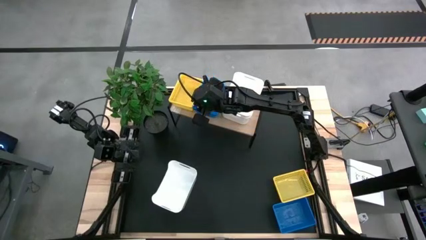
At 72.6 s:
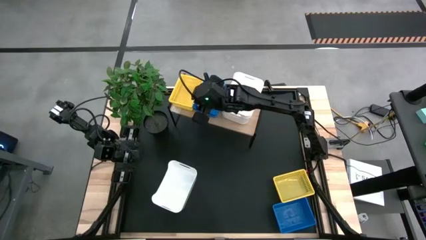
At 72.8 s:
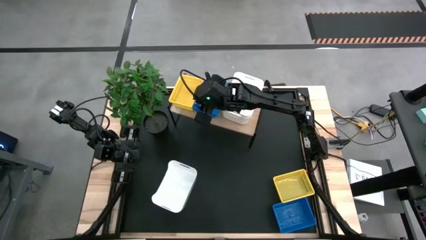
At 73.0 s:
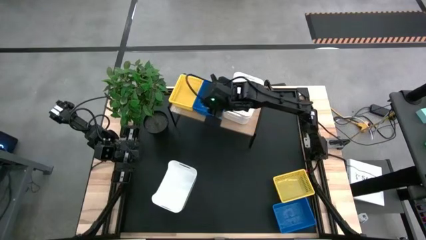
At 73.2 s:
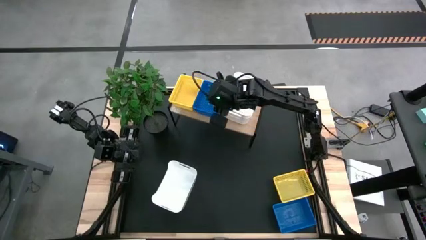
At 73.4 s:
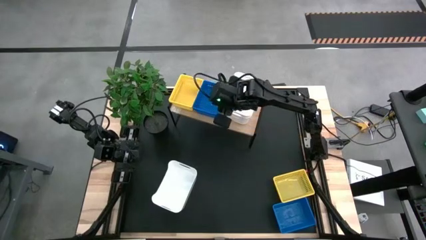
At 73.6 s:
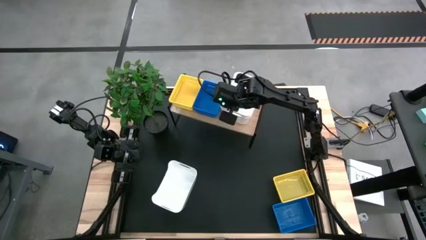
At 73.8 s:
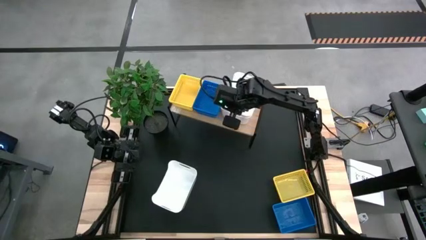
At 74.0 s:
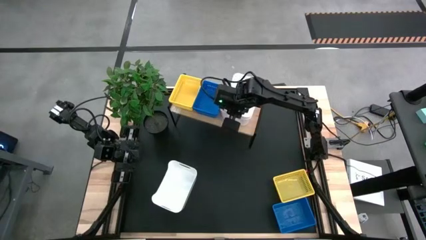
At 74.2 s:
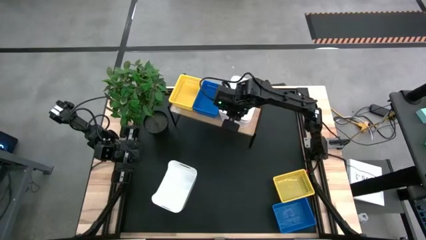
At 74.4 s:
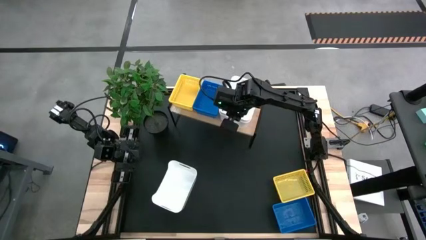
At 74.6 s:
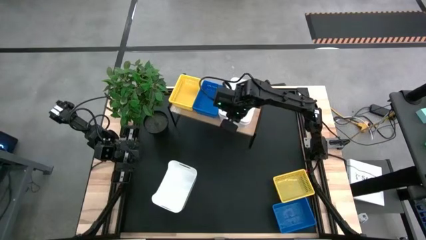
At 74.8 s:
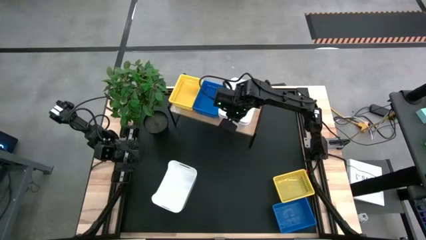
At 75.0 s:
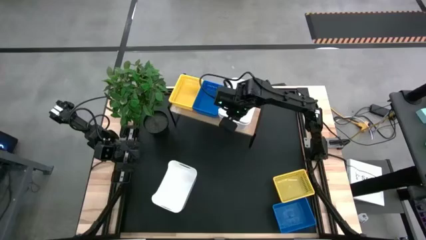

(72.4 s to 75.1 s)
Task: Stack baskets on shelf by color
Adjust the stacked white bins on the shelf

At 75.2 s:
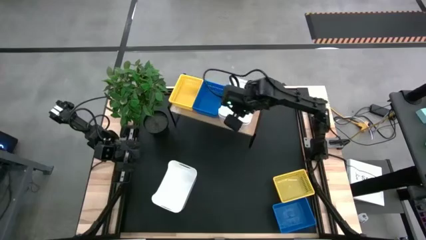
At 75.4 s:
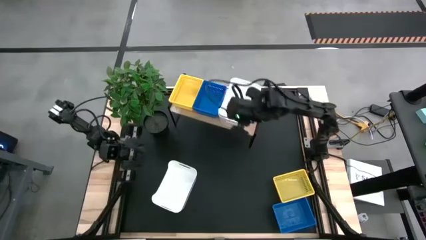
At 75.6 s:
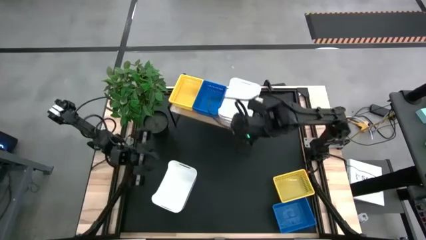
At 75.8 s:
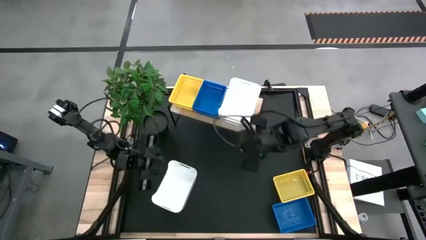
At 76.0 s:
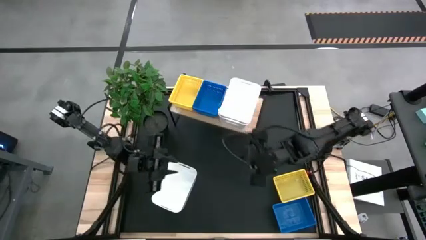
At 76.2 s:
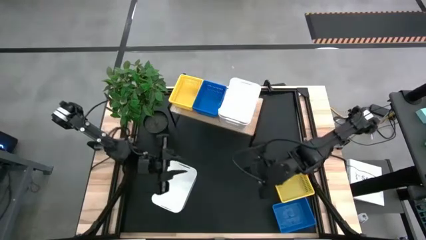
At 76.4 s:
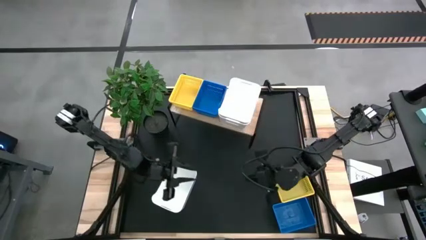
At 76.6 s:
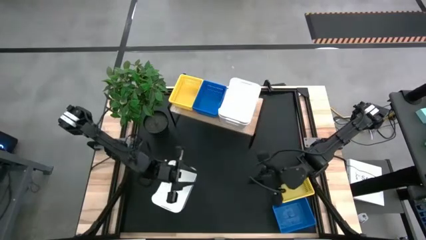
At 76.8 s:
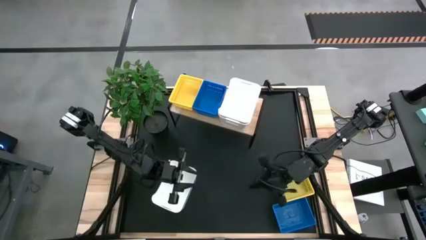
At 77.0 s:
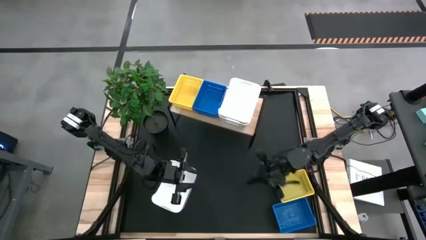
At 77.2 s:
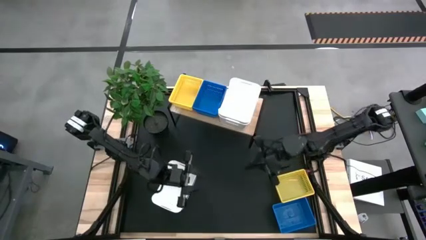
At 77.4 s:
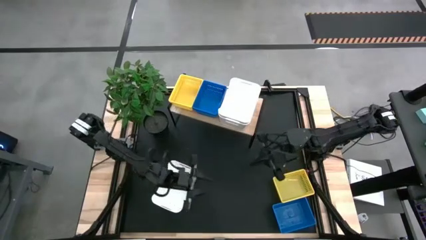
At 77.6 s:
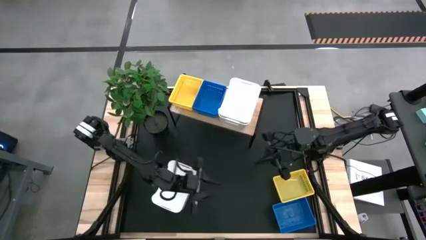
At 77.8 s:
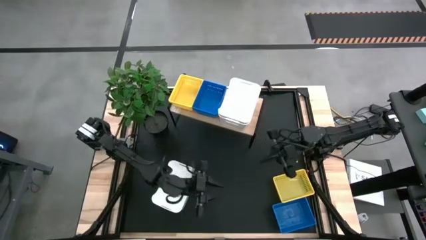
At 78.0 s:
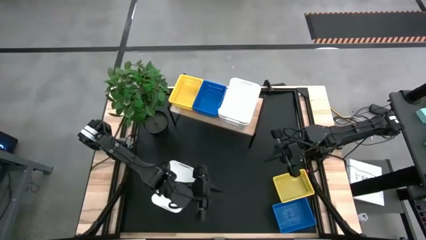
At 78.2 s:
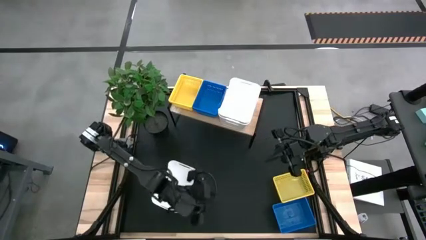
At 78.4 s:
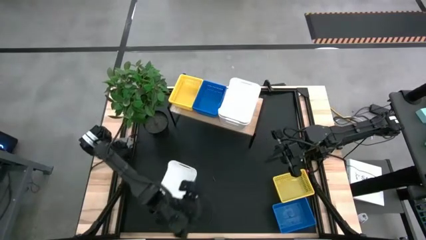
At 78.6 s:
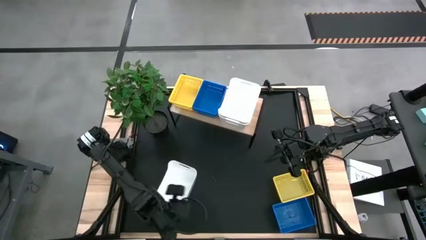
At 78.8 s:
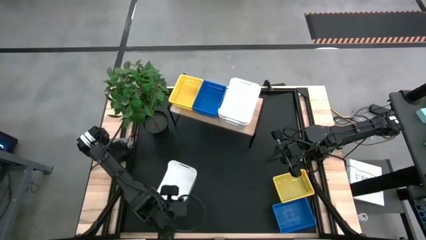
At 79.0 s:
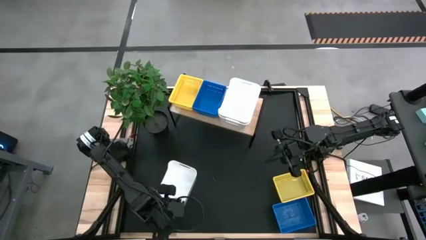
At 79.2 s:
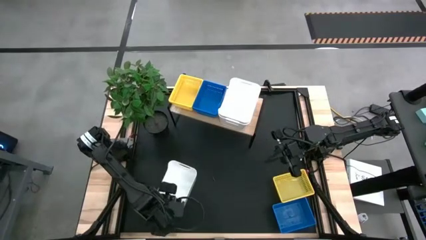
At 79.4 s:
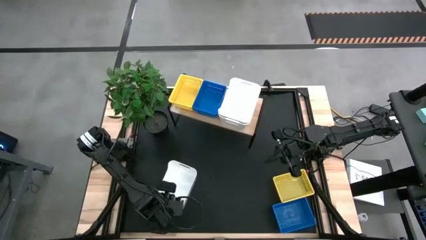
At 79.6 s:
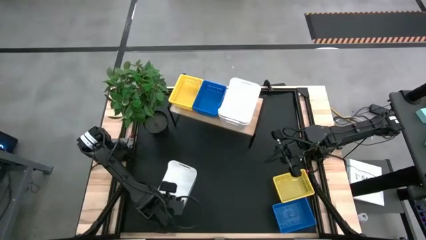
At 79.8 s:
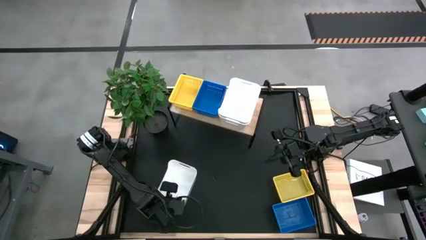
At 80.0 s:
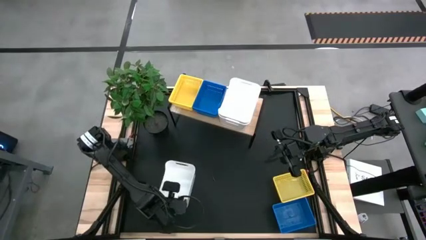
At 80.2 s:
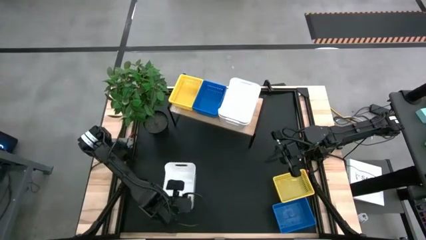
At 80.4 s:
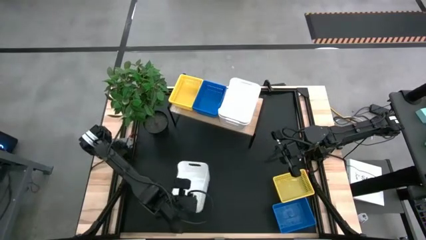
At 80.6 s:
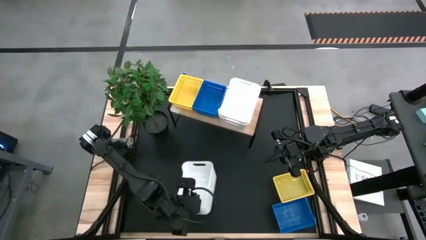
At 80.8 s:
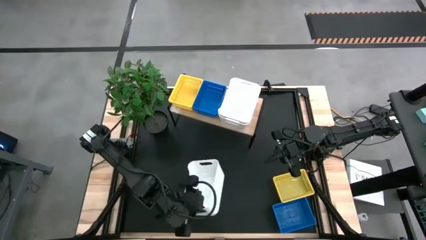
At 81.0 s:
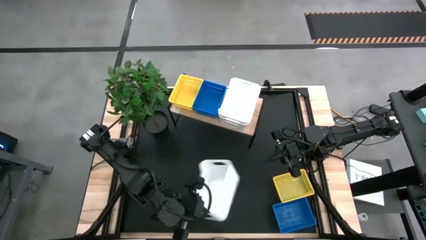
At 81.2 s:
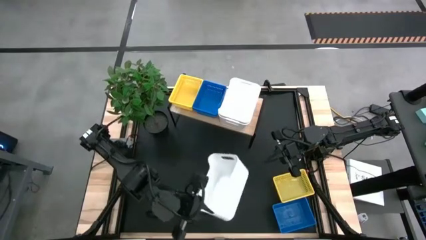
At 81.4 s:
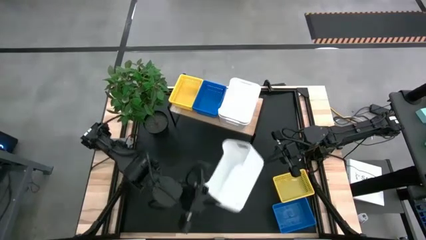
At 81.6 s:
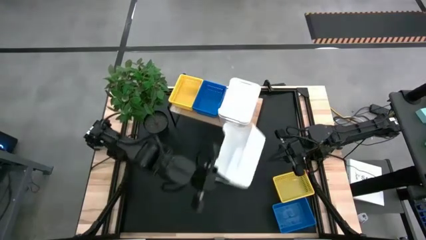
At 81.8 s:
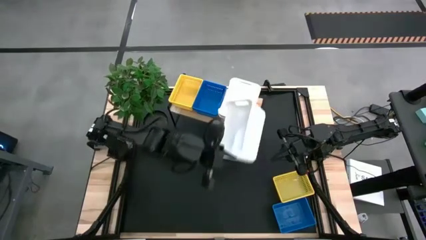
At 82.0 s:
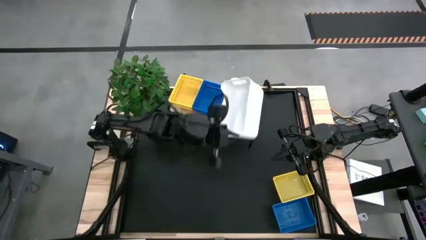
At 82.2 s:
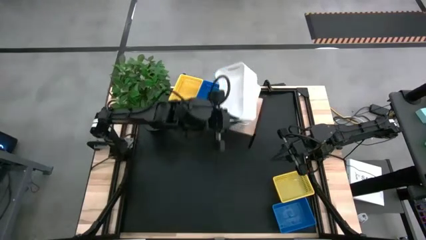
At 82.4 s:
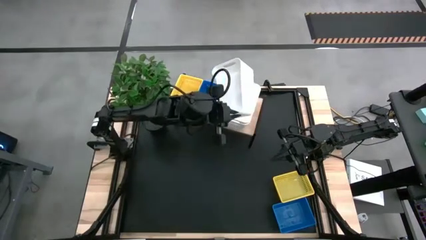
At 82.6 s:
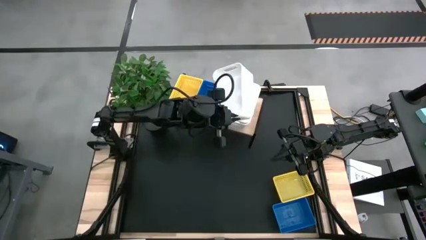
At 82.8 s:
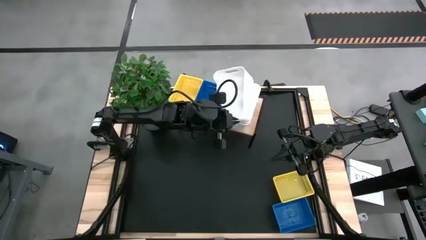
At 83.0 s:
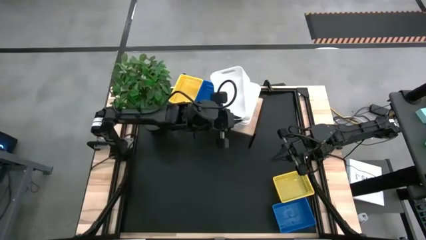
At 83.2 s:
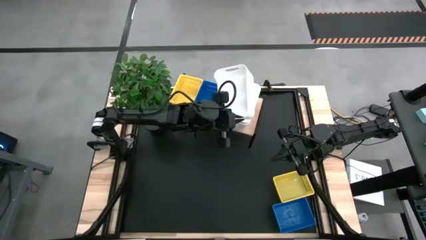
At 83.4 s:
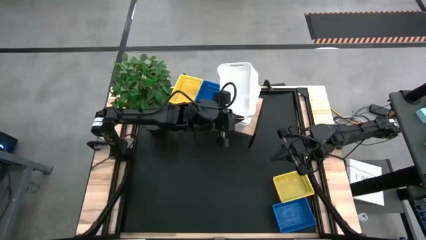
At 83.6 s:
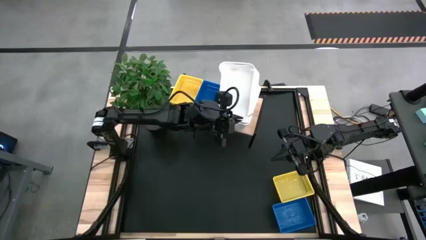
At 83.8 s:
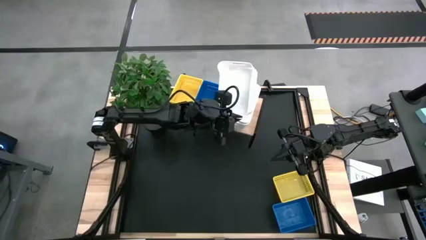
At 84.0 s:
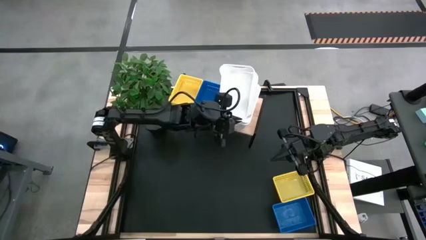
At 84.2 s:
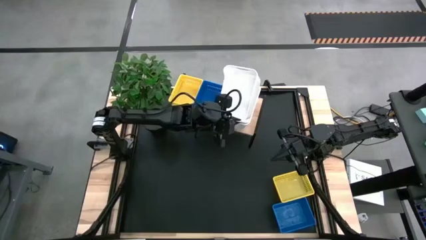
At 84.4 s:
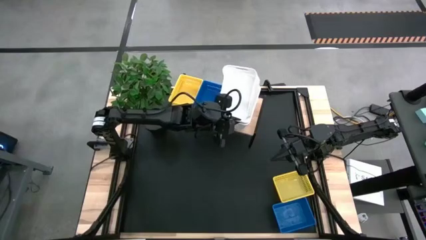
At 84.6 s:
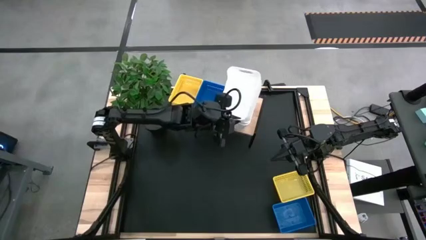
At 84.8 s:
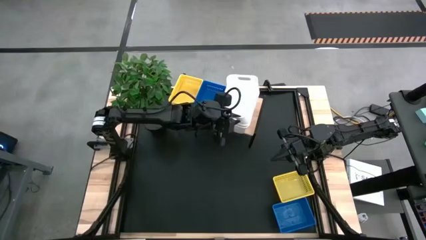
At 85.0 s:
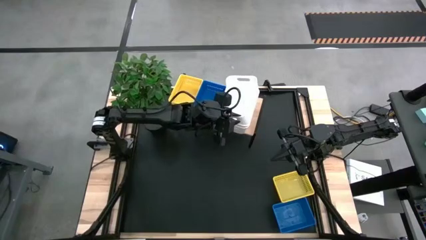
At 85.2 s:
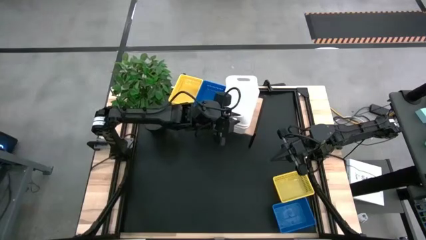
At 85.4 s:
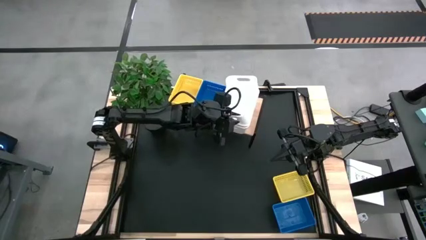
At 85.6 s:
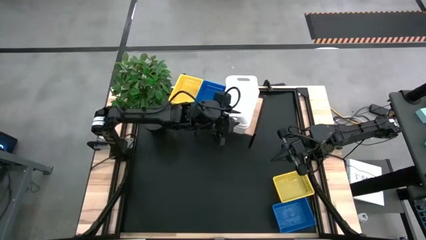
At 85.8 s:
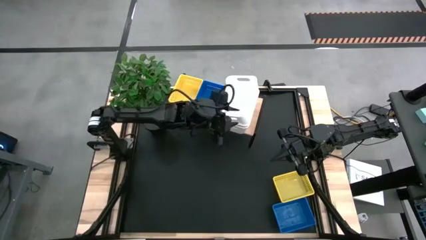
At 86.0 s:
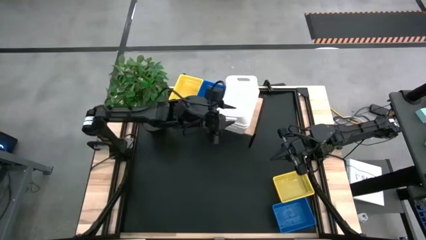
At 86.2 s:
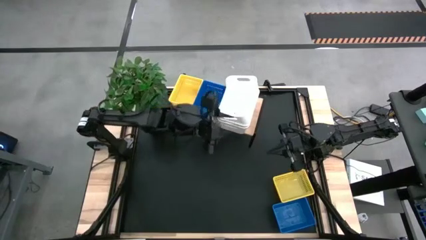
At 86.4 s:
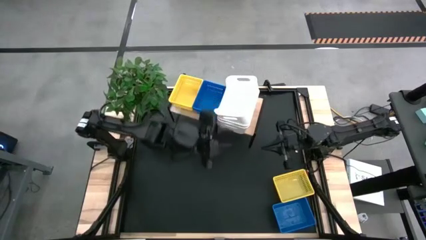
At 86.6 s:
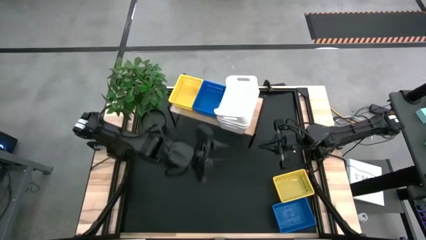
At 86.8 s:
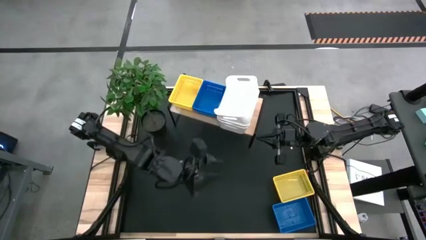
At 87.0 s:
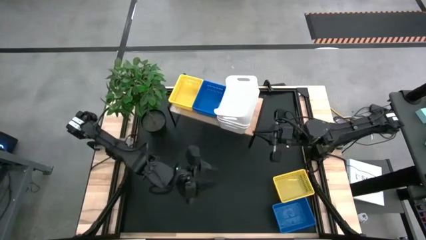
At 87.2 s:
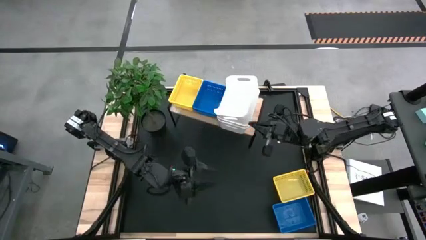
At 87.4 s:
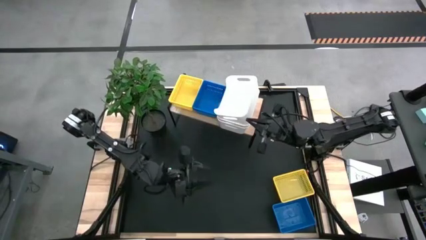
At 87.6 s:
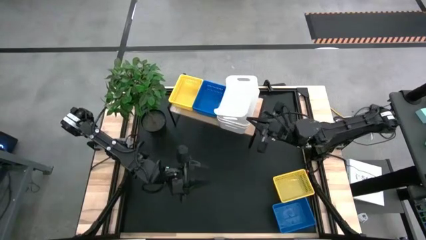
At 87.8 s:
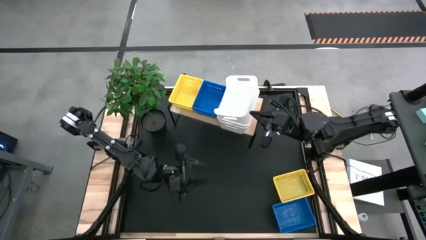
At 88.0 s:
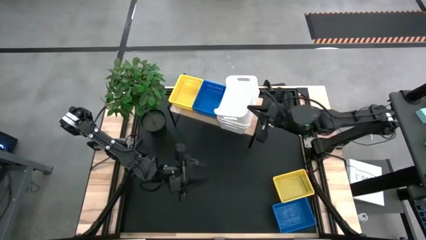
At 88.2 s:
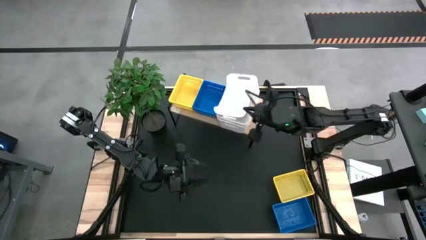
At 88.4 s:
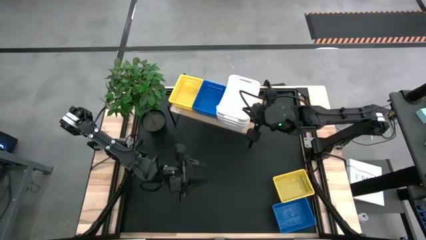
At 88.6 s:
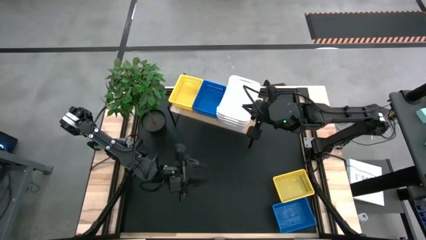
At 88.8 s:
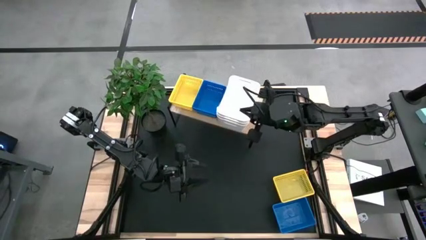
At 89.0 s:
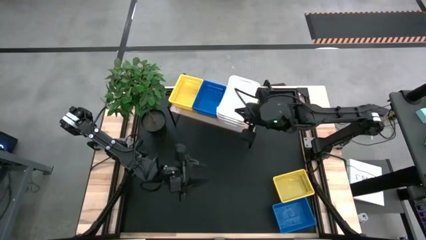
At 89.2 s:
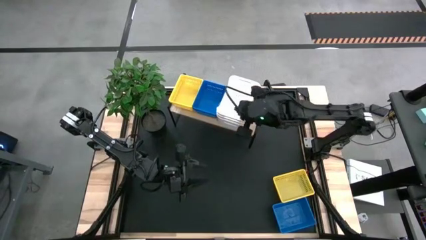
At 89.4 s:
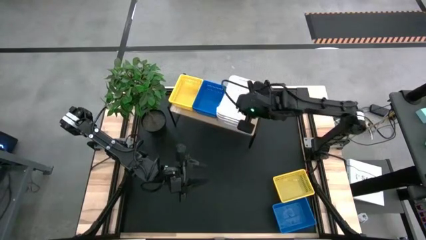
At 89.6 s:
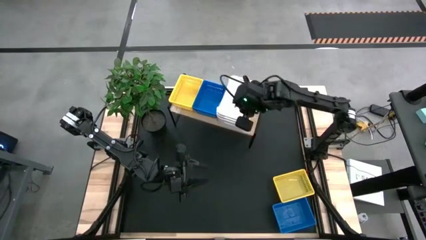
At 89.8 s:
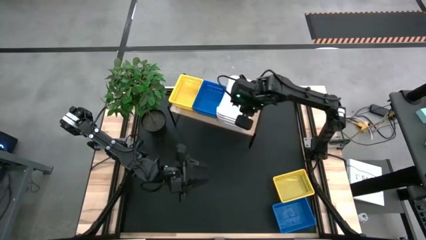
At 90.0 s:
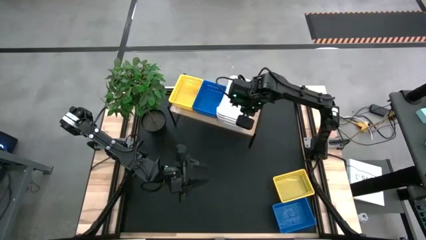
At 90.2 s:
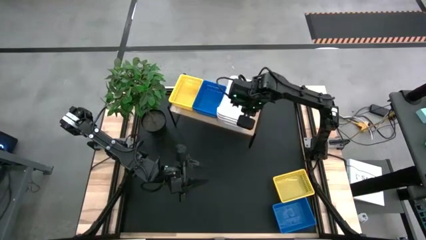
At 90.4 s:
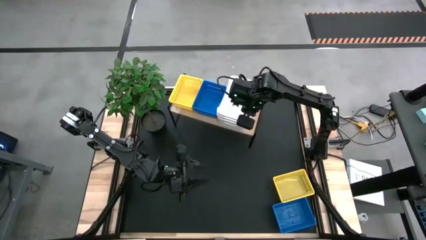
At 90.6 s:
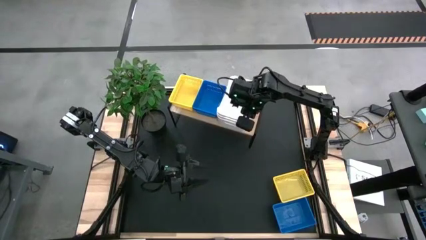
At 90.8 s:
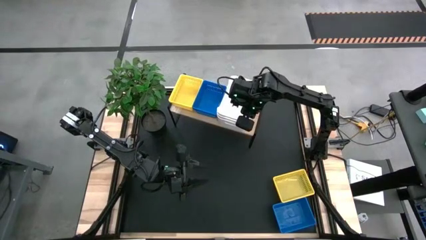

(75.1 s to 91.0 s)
Stack the white bin on top of the other white bins on the shelf
